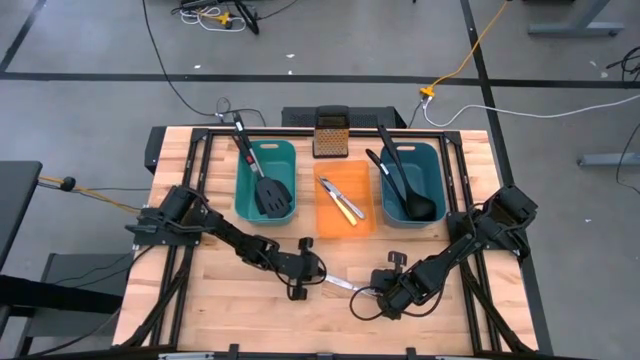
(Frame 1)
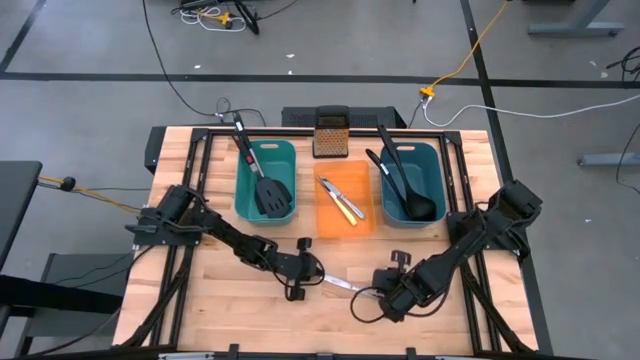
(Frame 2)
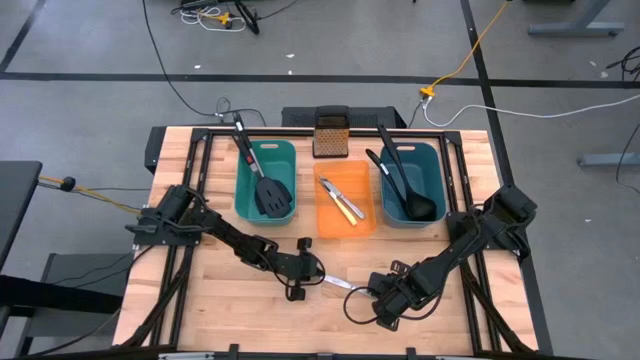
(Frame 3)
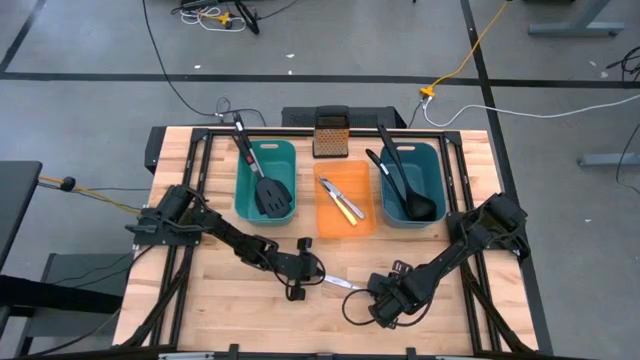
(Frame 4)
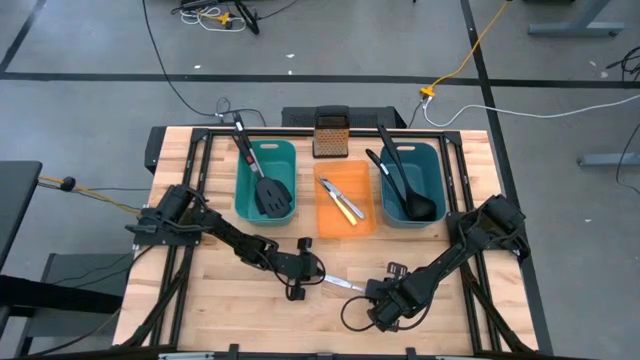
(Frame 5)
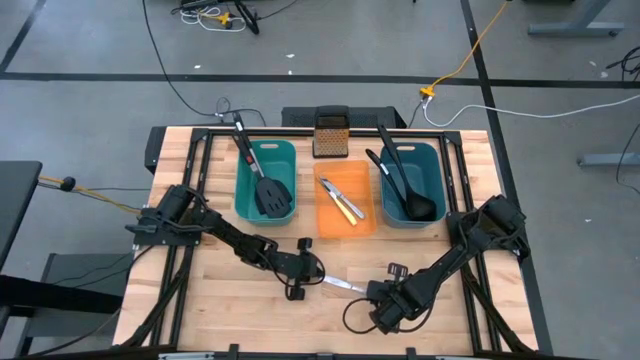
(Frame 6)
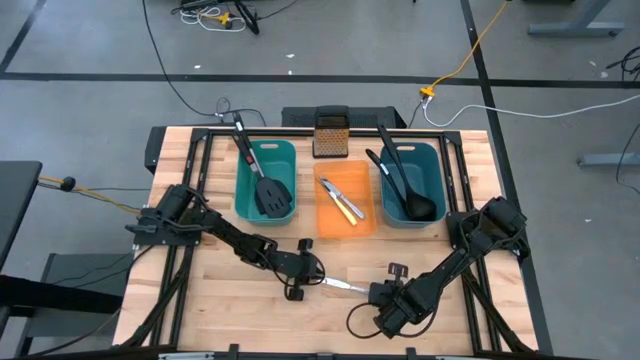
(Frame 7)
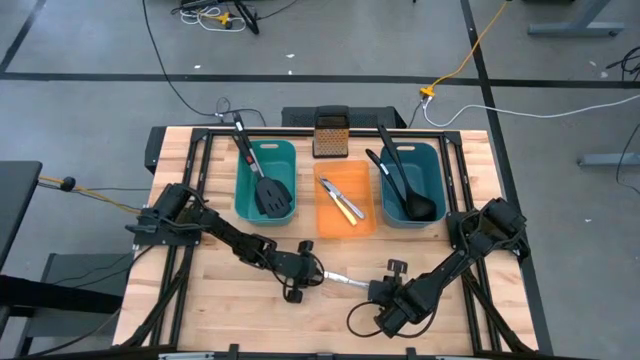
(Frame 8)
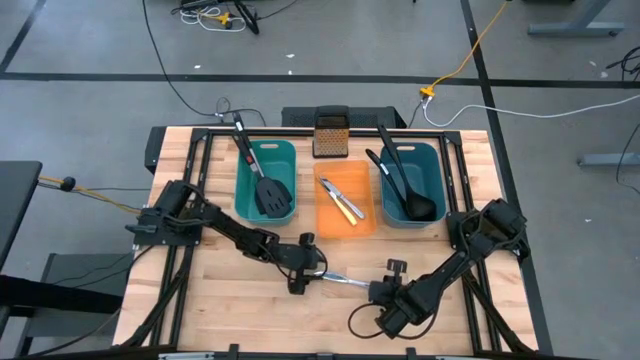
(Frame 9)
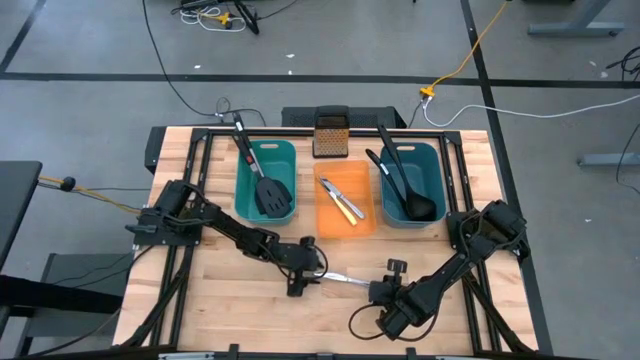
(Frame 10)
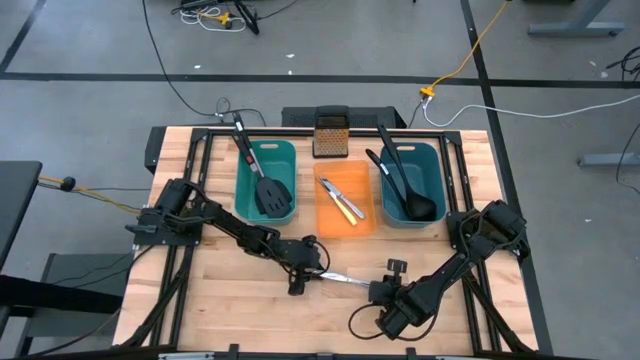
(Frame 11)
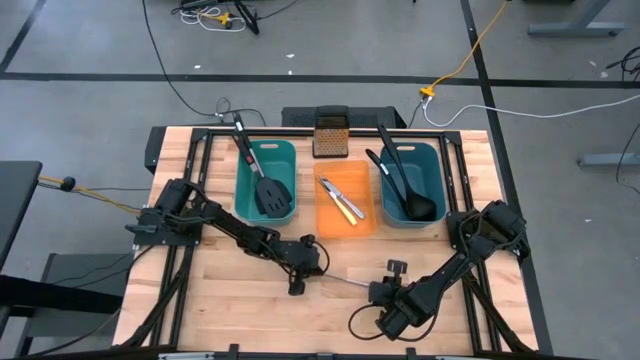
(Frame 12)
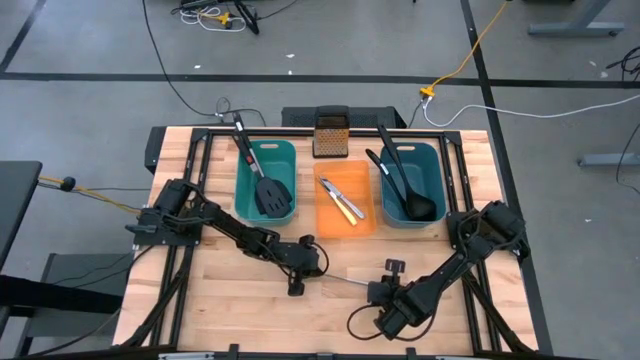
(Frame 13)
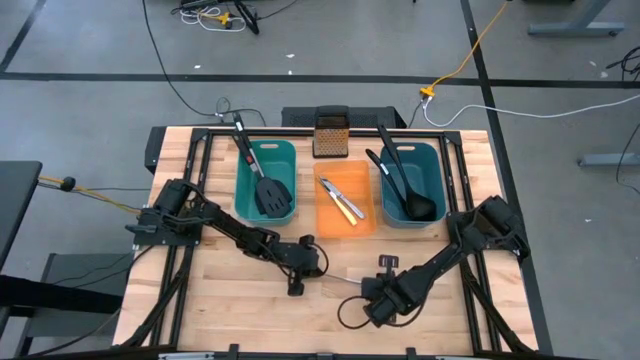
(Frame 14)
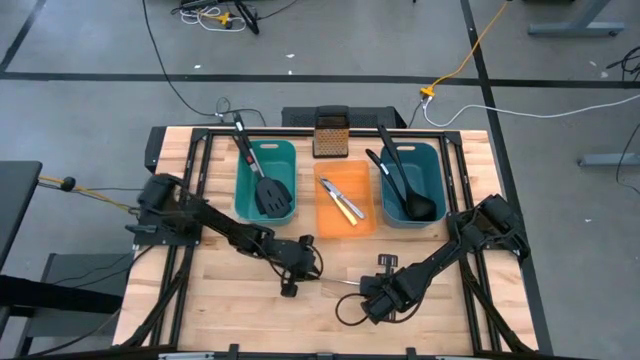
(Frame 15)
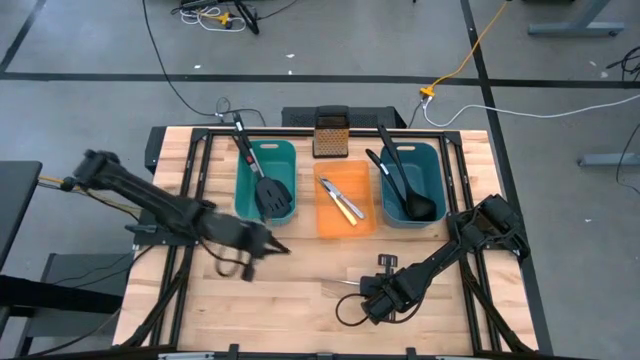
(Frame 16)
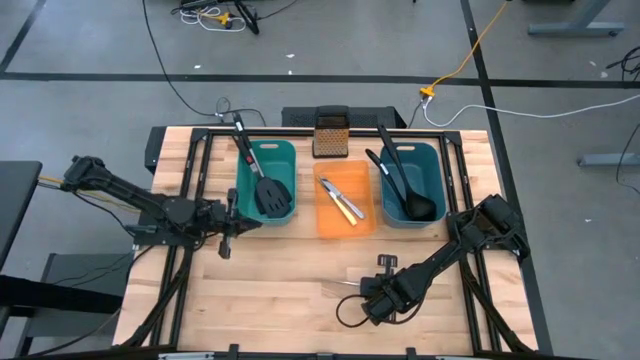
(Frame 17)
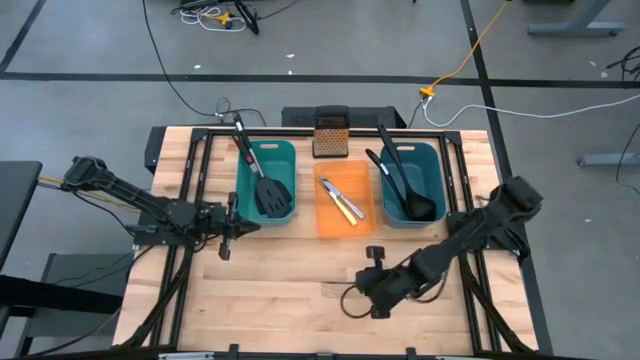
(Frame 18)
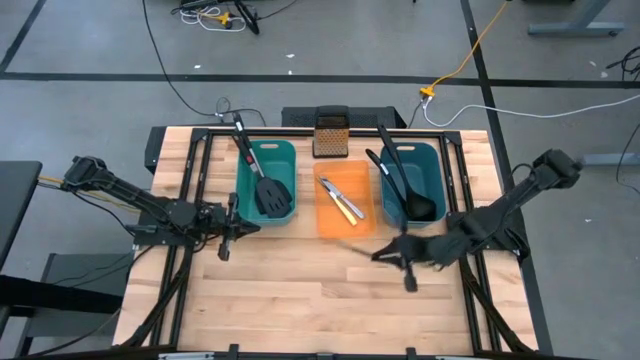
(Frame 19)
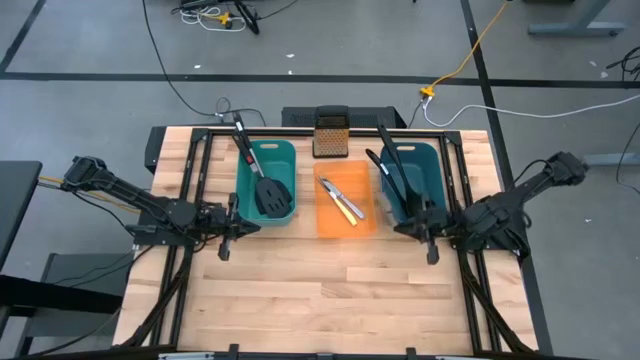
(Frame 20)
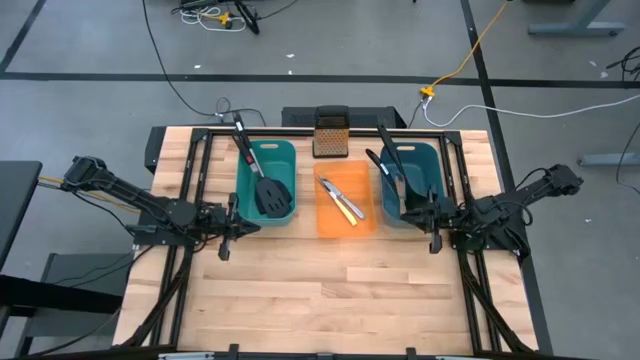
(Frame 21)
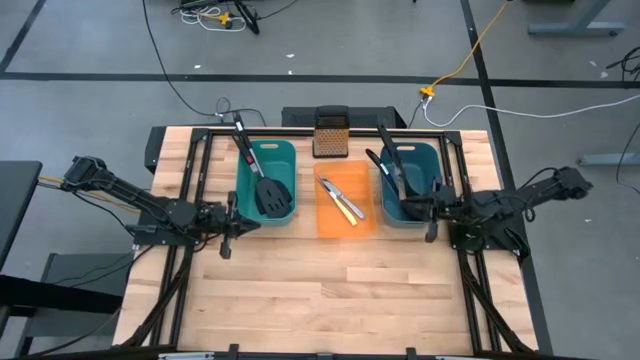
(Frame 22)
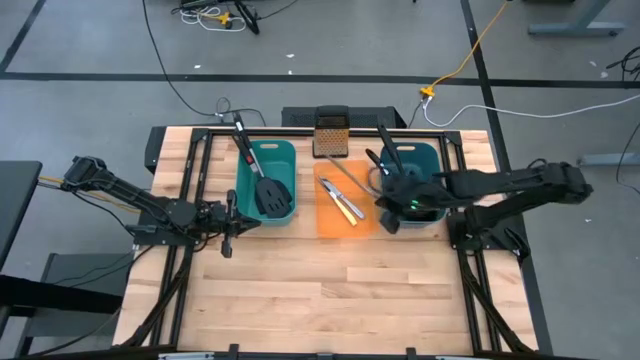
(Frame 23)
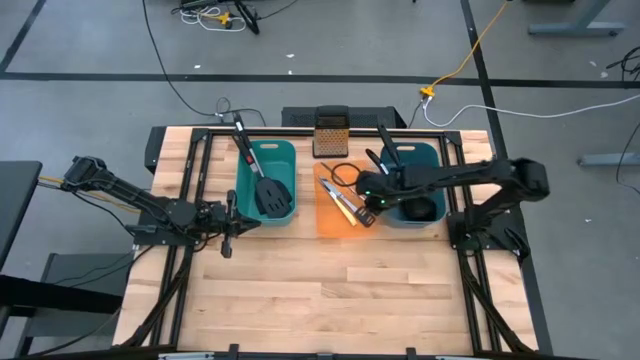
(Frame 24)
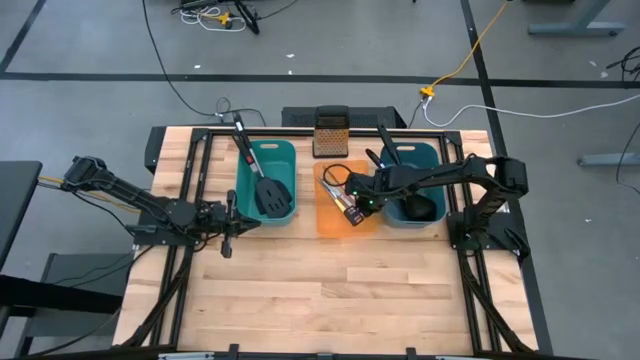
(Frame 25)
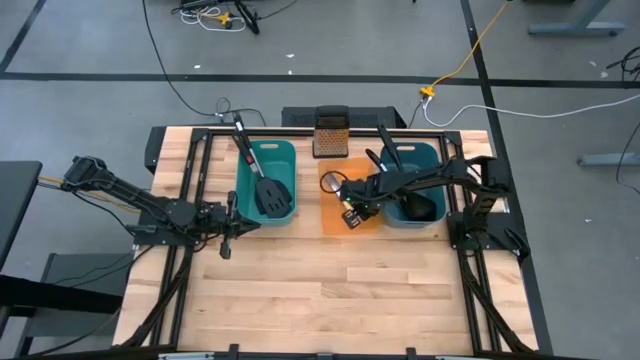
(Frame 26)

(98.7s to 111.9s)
Task: Pick & Place Kitchen Items
Put the silver table knife into the orange bin

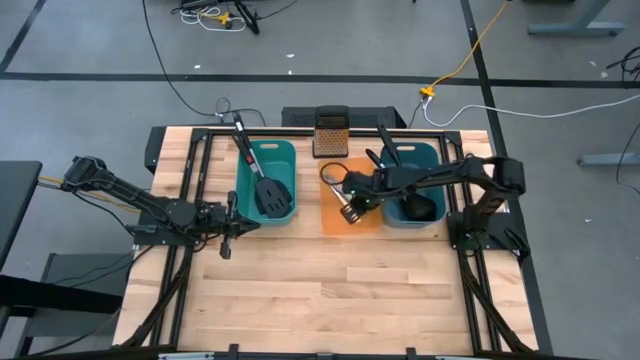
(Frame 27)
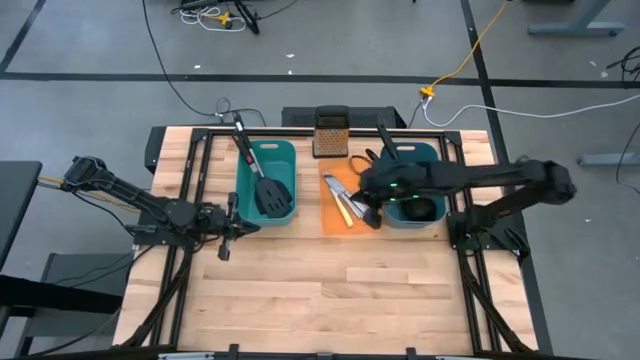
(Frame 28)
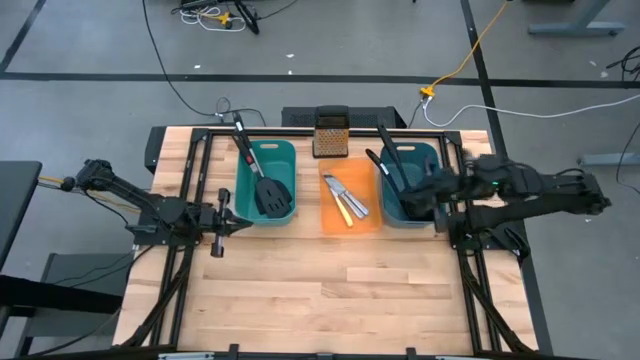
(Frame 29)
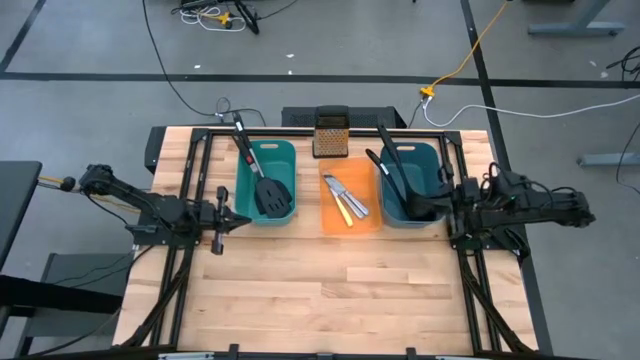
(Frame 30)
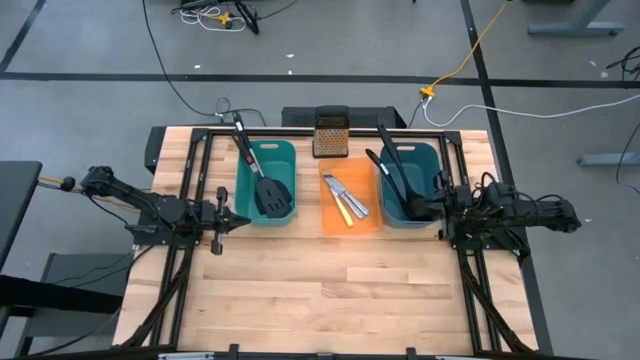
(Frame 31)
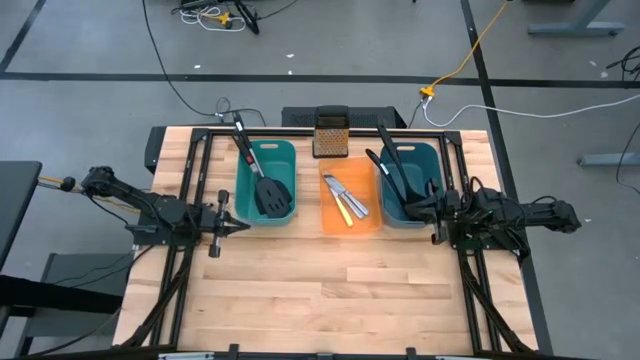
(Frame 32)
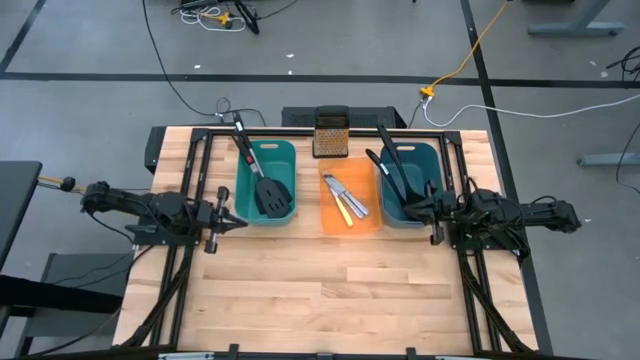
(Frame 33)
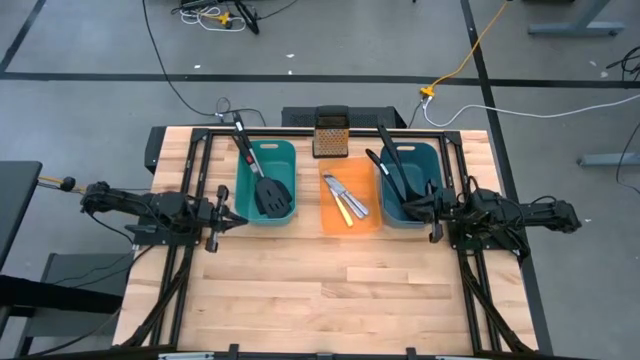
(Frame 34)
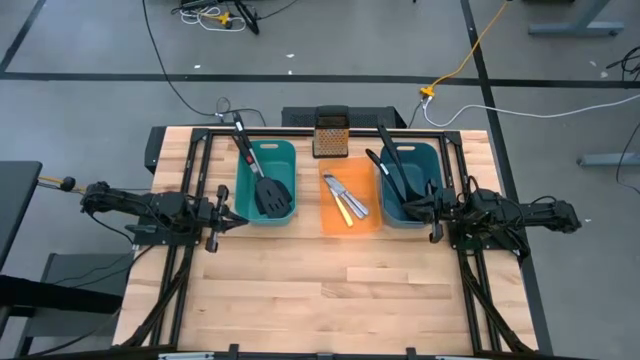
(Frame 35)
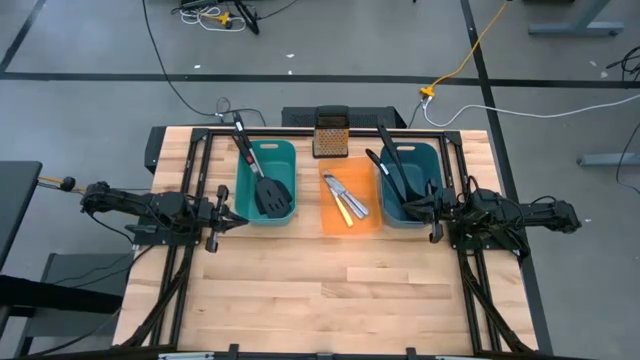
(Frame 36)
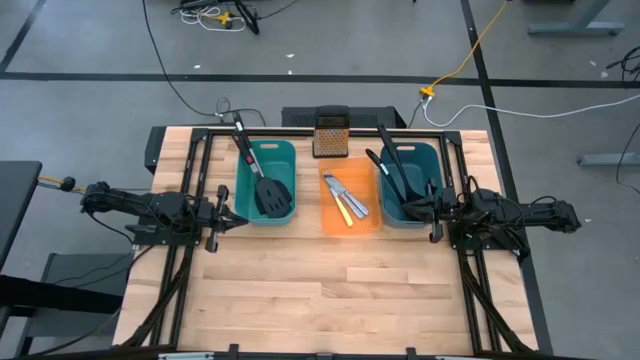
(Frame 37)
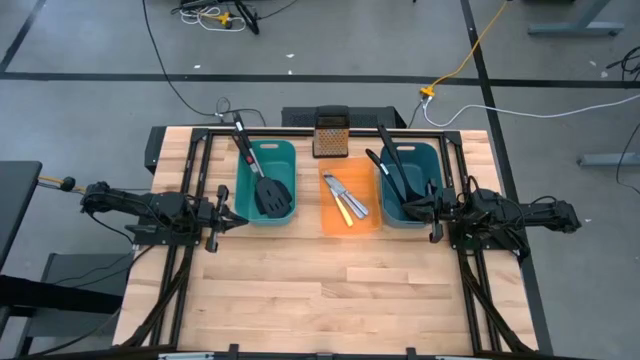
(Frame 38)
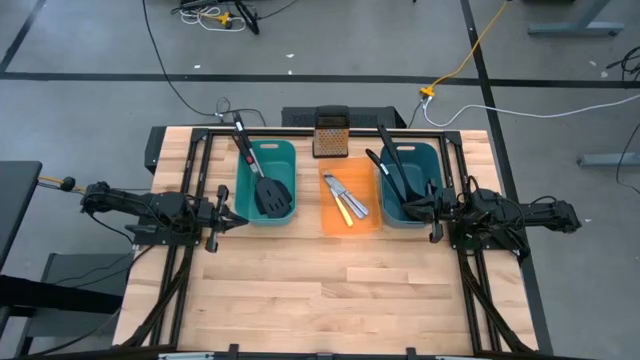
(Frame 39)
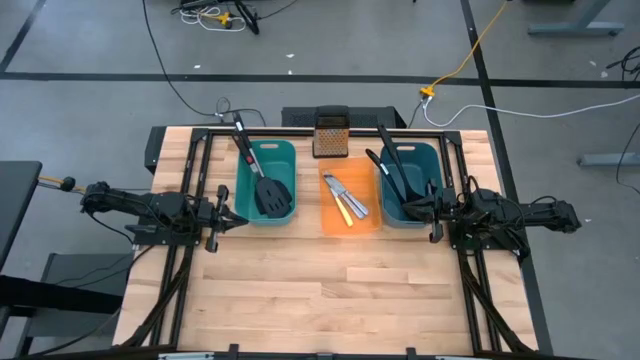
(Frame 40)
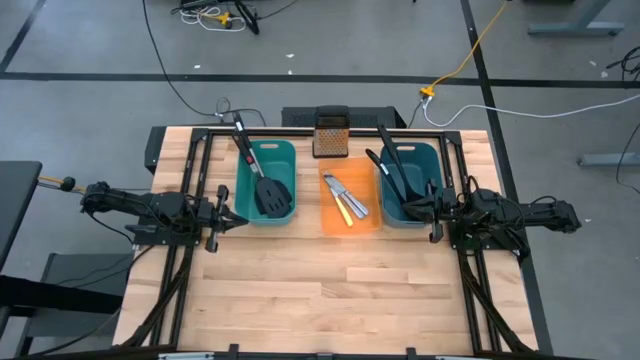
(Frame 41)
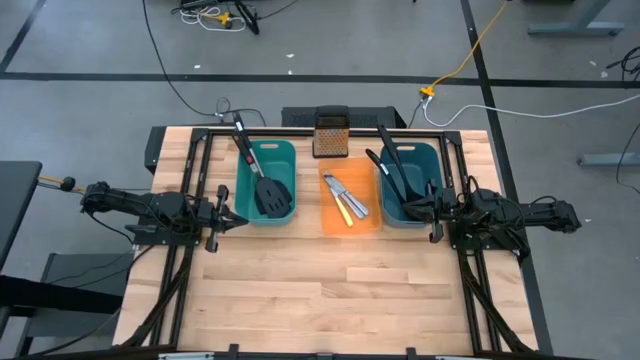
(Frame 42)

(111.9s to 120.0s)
Return to Home Position
